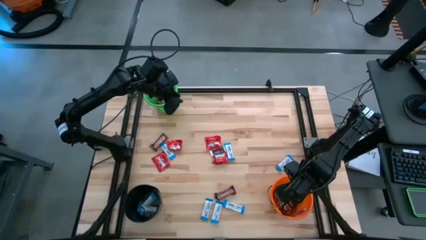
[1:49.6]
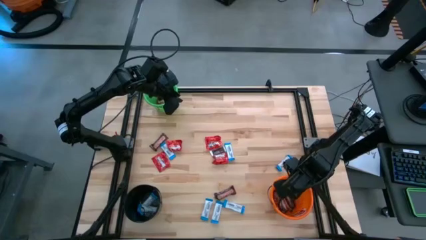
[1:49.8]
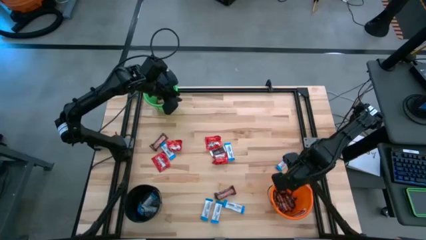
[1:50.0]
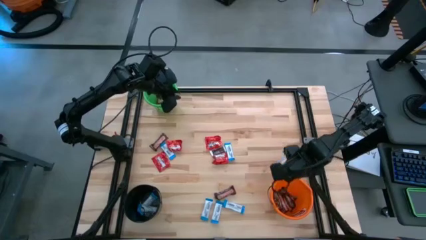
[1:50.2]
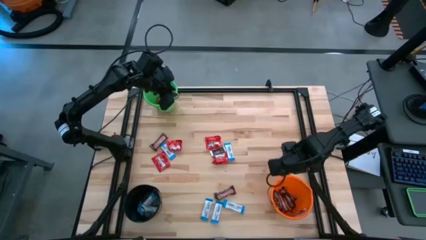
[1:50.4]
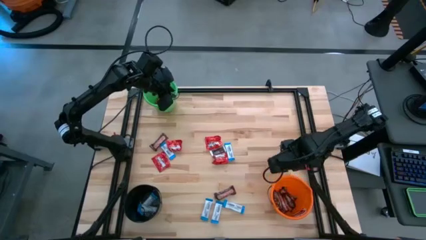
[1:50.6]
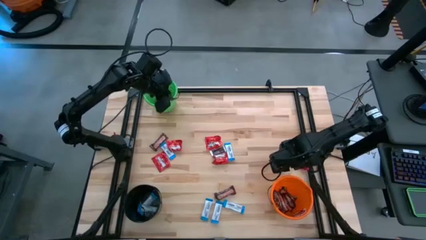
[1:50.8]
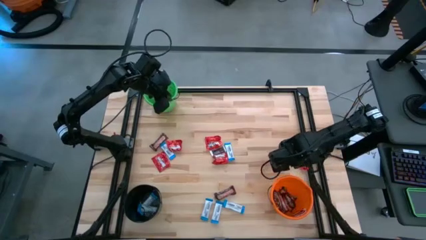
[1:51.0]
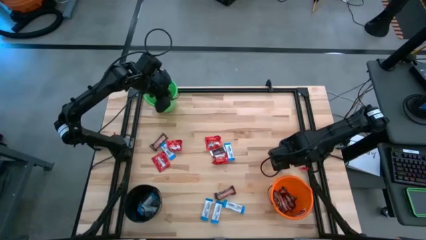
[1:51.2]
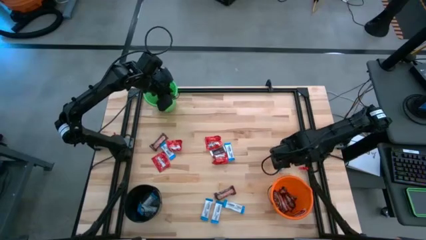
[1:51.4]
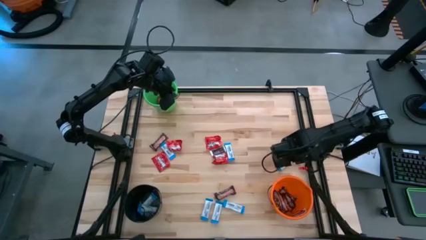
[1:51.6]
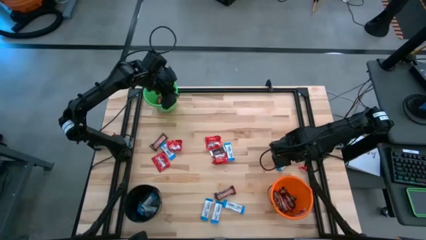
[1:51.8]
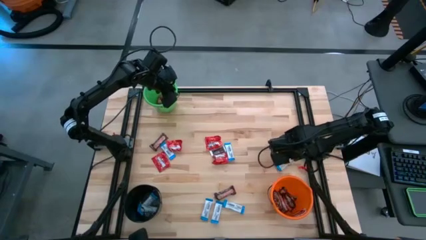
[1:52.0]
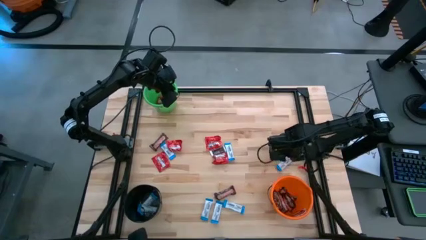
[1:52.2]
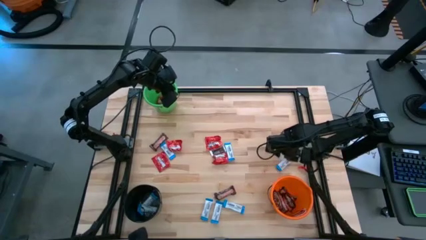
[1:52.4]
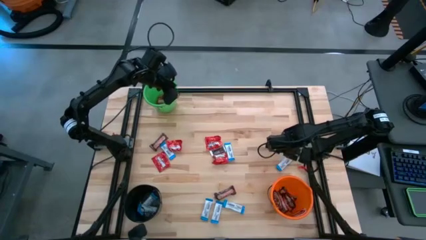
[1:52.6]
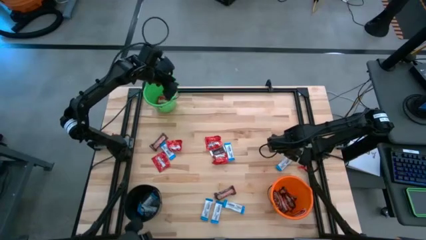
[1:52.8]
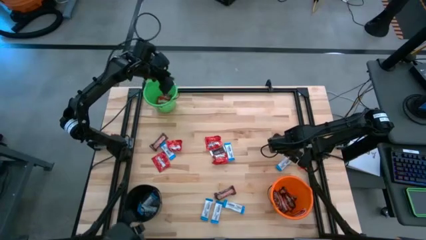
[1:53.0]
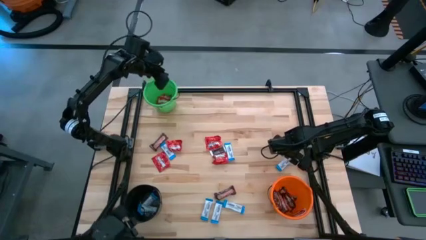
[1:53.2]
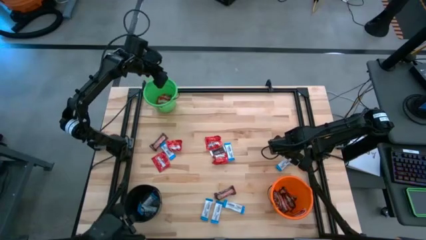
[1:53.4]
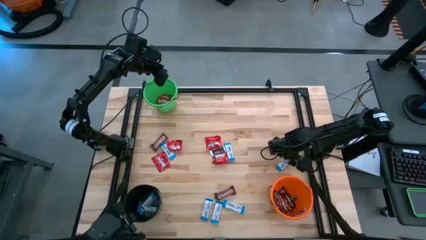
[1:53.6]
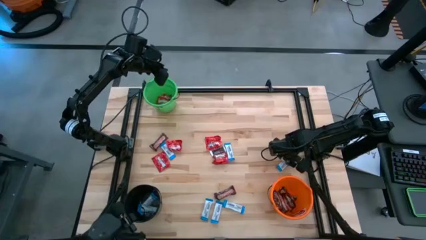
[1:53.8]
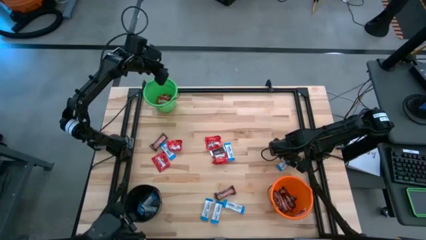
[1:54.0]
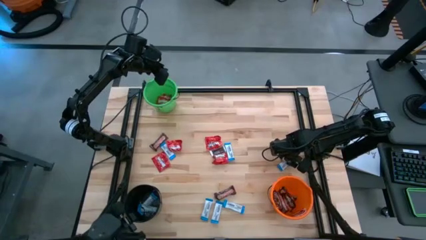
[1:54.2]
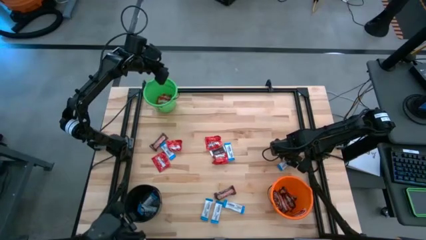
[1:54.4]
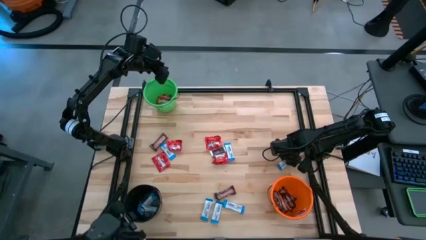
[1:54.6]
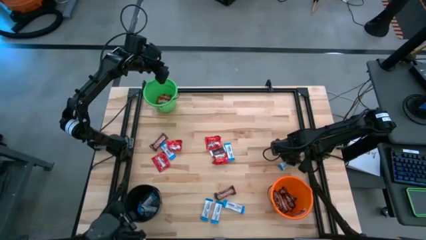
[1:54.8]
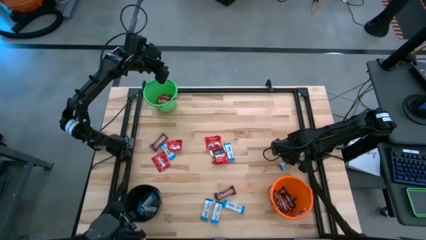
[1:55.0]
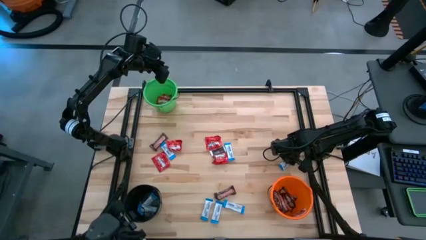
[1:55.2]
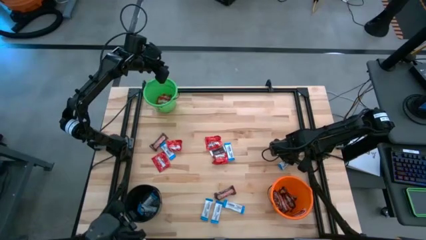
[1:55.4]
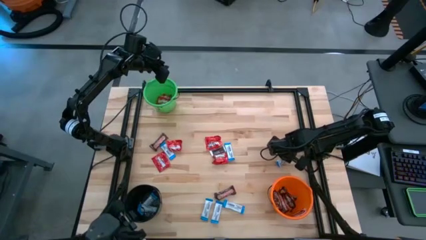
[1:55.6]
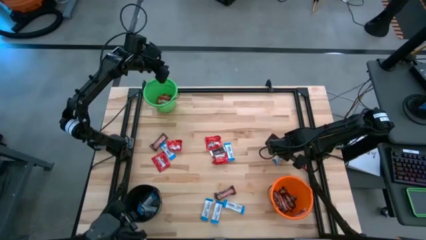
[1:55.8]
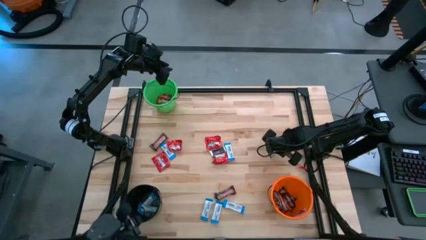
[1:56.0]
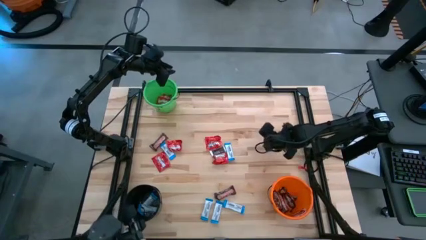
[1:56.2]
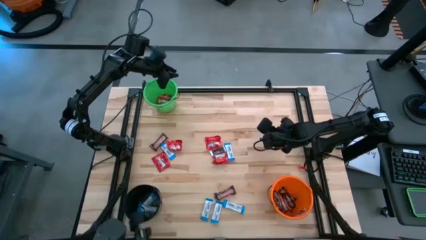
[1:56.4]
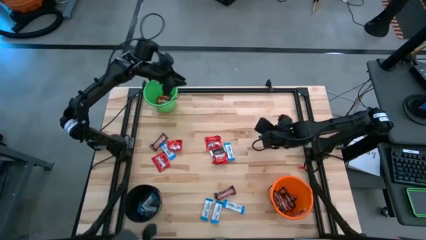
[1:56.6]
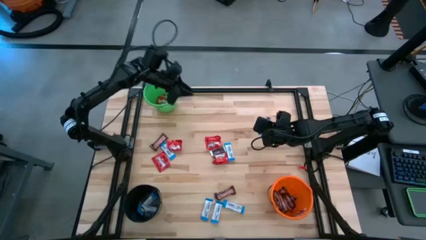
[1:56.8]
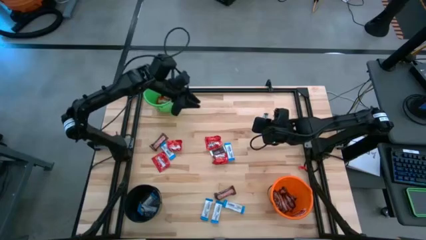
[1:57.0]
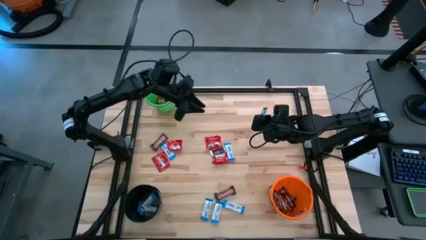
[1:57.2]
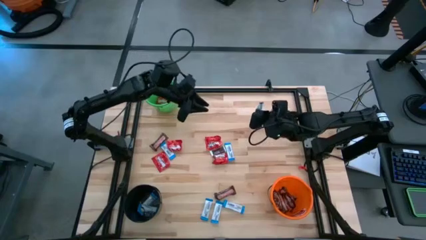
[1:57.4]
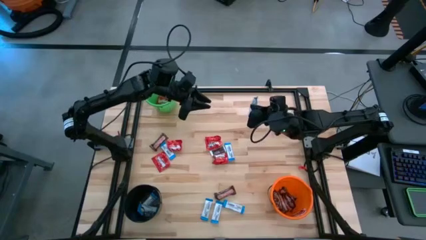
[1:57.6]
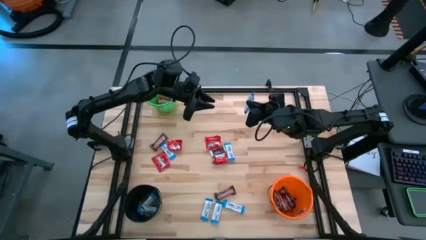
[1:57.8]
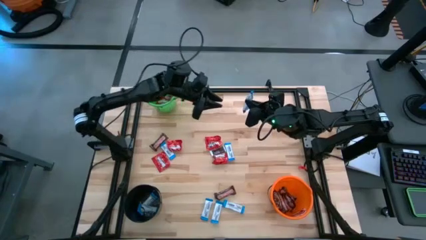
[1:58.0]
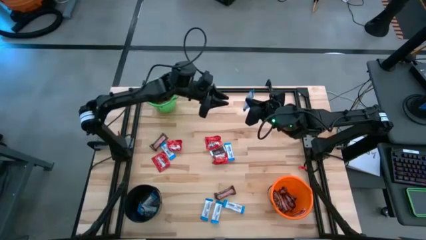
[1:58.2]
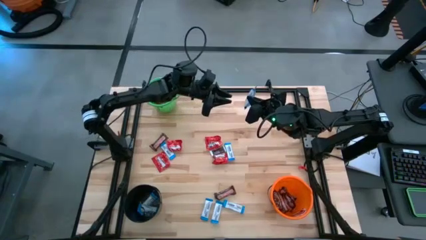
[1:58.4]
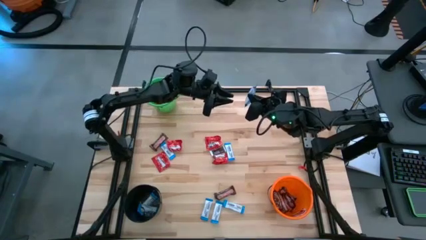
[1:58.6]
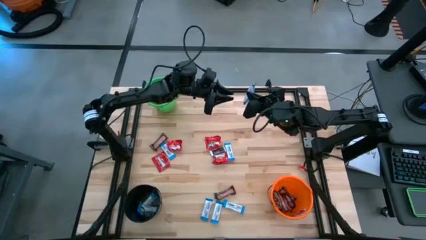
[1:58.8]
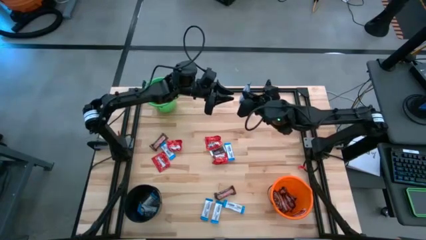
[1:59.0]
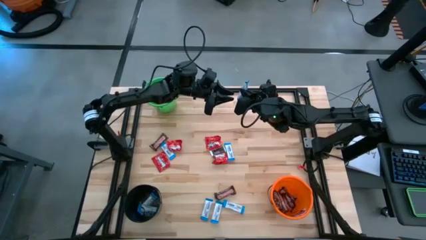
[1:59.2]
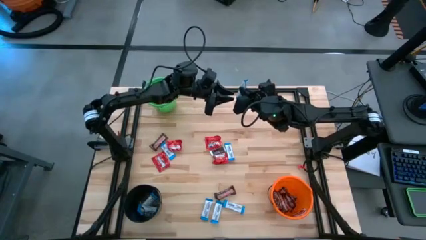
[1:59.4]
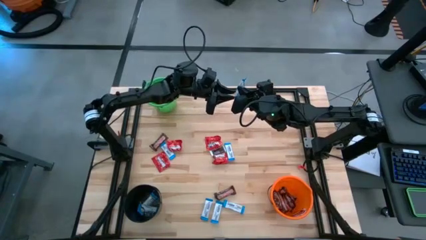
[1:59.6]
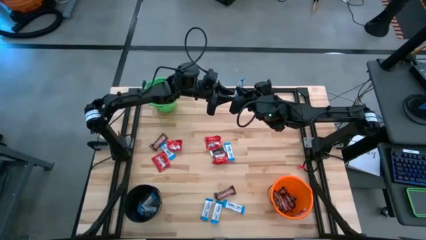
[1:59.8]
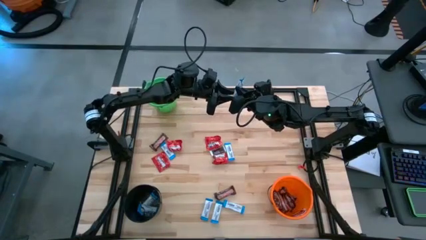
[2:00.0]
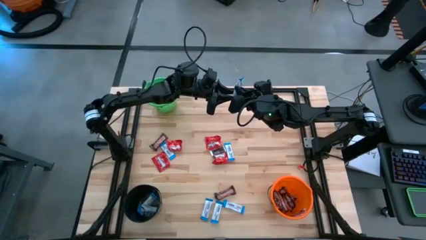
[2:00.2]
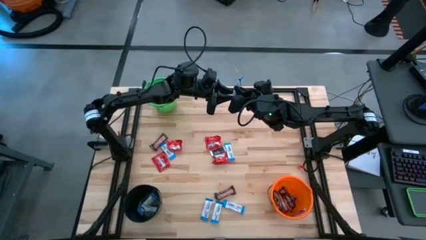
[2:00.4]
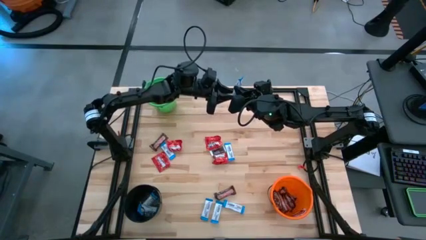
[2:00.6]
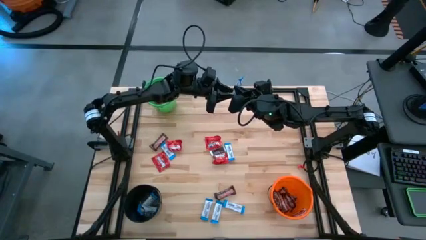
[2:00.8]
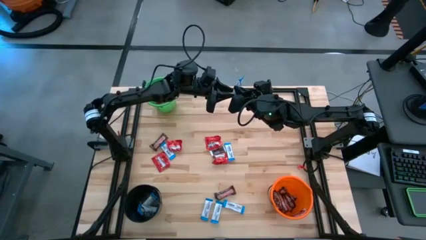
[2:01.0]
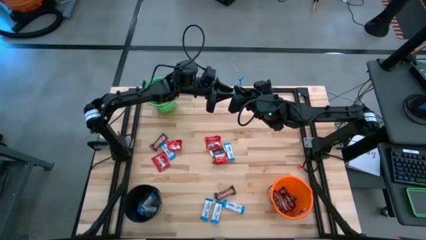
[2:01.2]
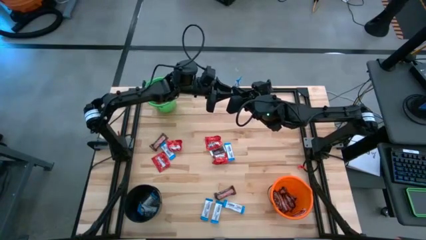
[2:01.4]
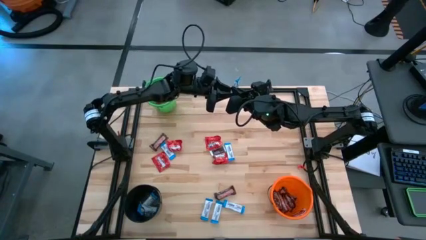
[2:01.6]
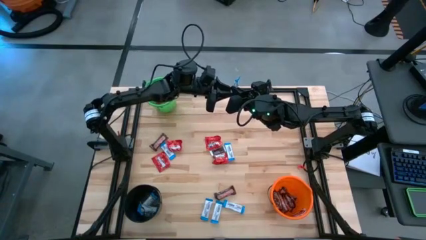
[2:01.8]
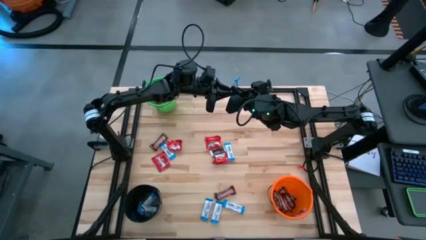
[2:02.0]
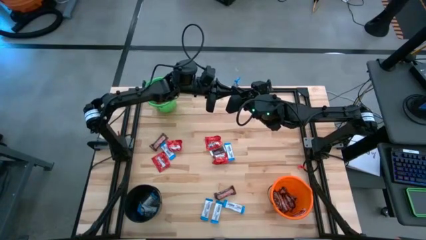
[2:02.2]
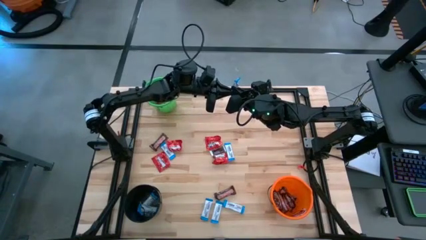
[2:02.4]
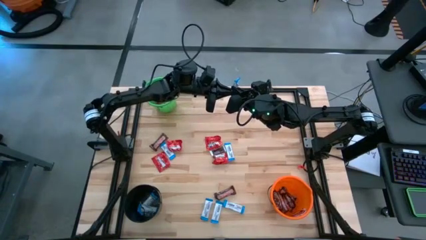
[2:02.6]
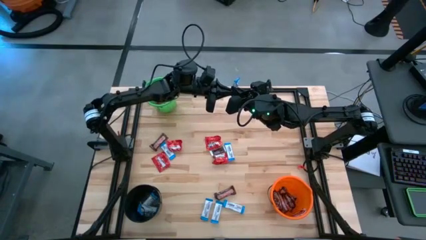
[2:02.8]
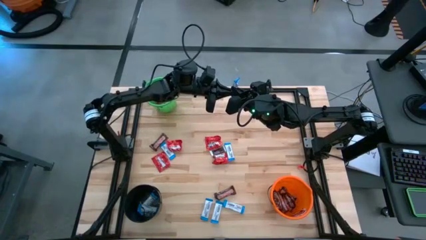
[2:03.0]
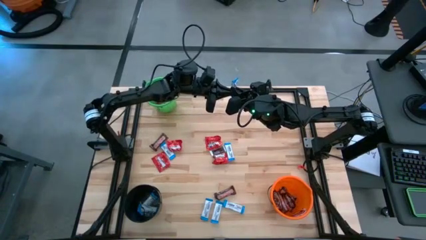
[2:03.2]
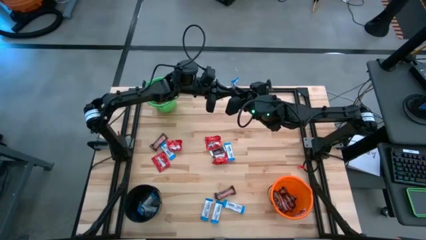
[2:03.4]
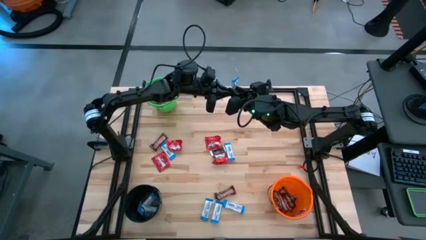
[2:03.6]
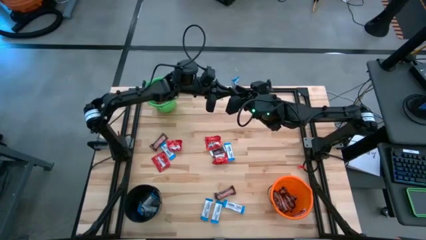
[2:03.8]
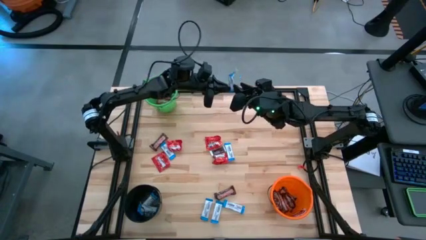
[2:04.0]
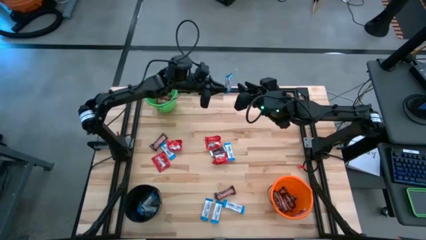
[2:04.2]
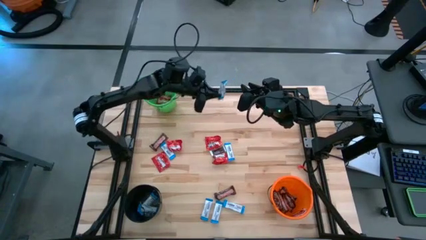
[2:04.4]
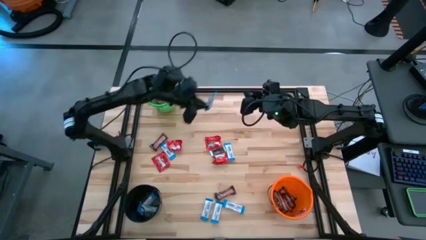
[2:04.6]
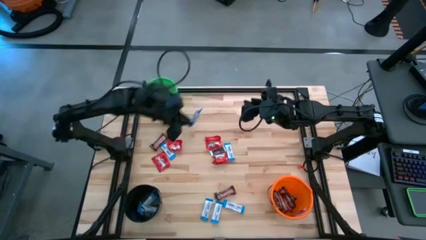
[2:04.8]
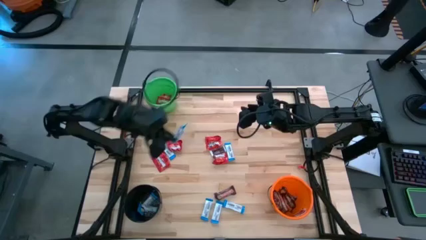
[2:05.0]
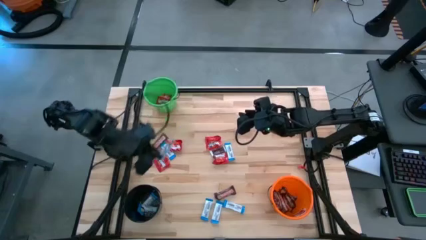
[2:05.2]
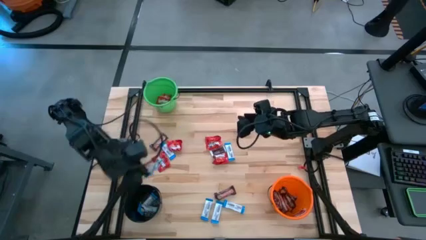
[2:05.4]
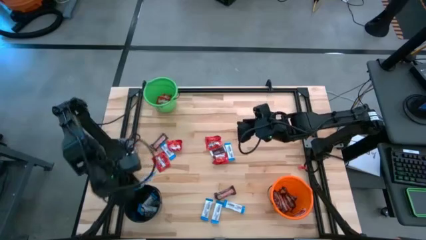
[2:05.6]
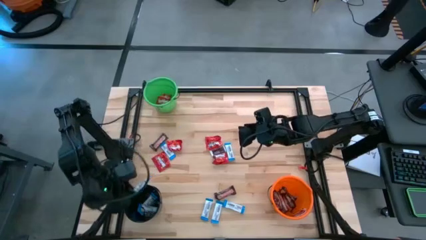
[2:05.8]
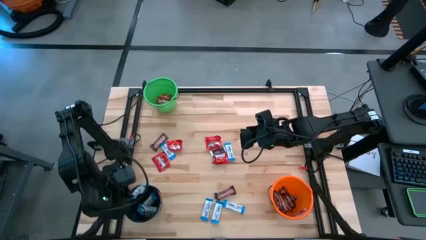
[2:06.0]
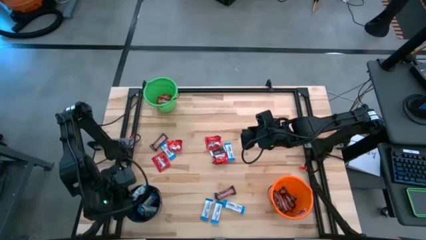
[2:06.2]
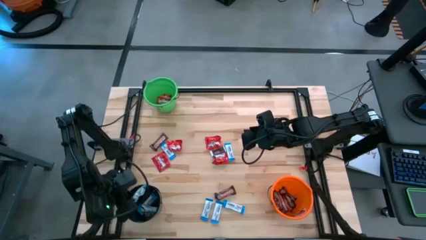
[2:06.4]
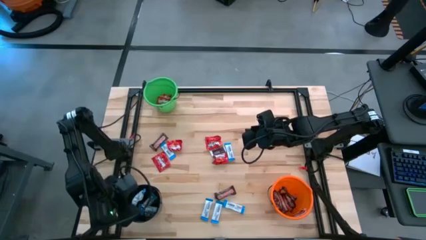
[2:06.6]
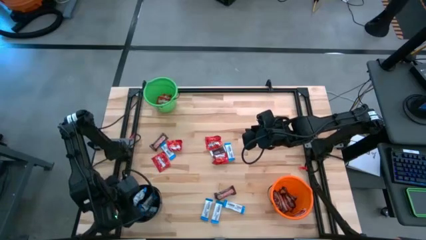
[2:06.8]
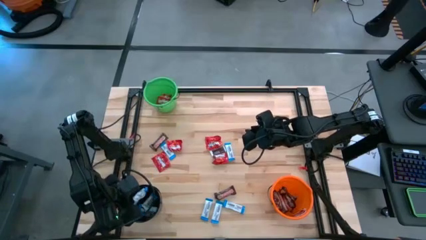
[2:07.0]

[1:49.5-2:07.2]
Task: Sort candy
Put the white chocolate into the black bucket
